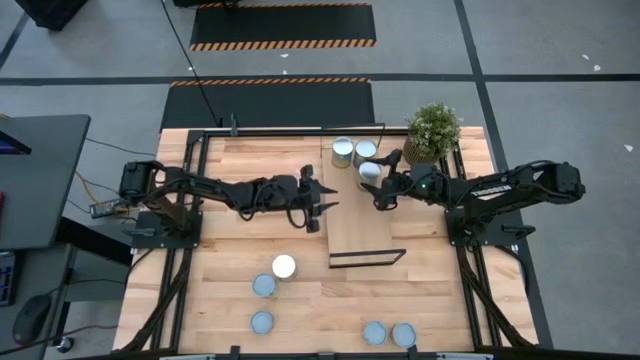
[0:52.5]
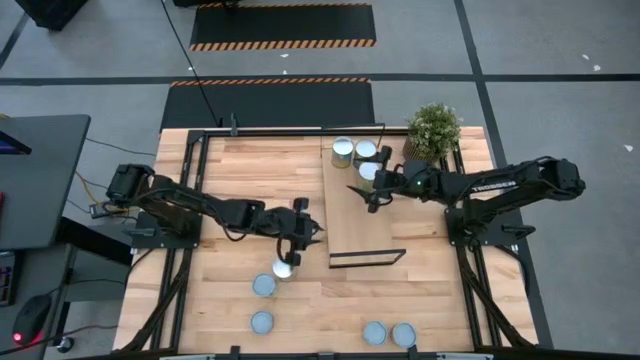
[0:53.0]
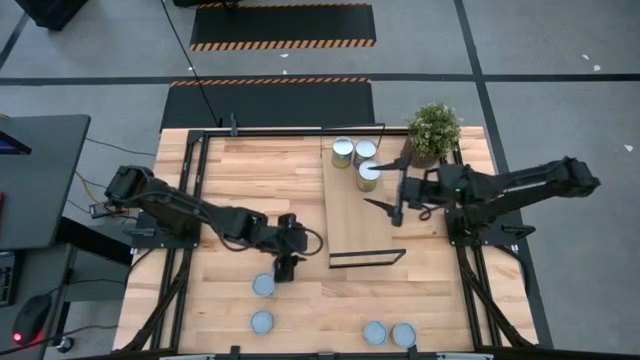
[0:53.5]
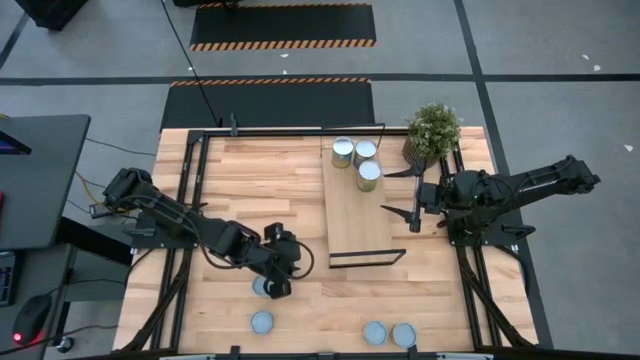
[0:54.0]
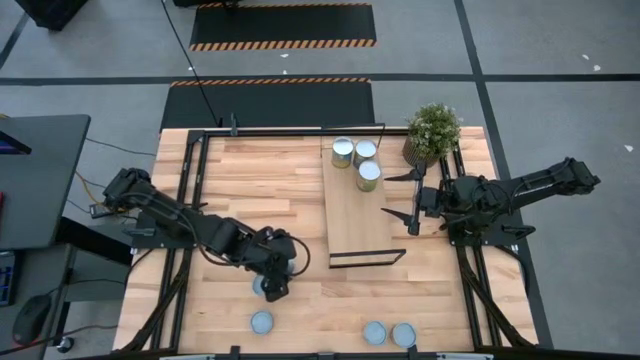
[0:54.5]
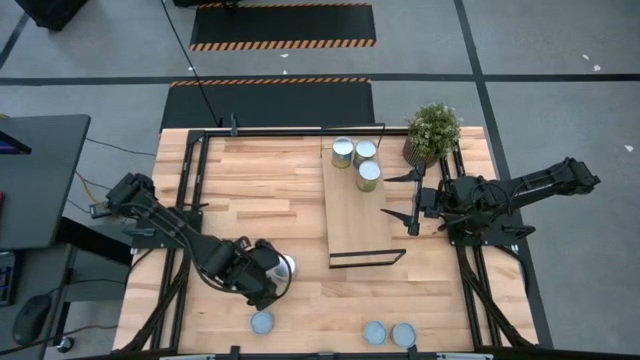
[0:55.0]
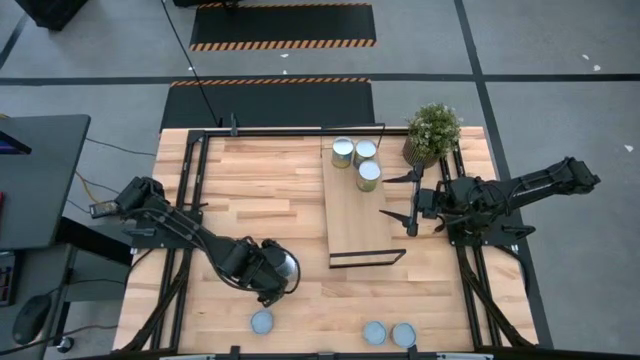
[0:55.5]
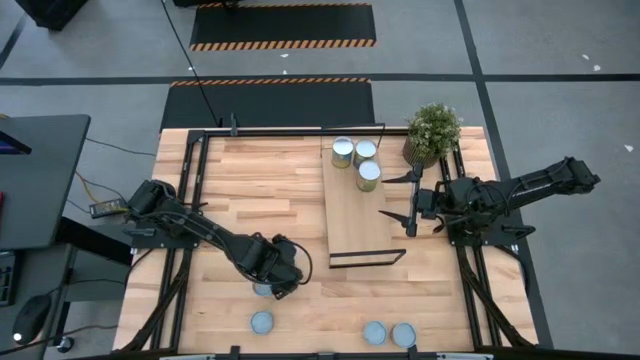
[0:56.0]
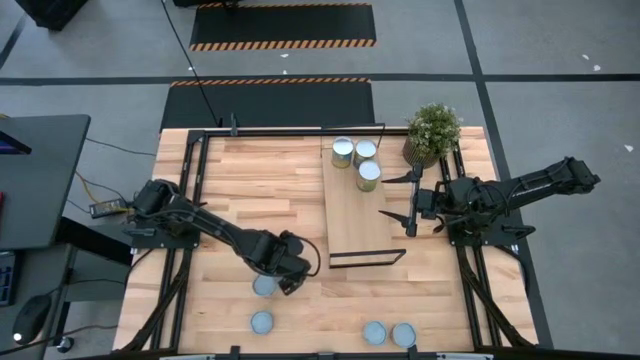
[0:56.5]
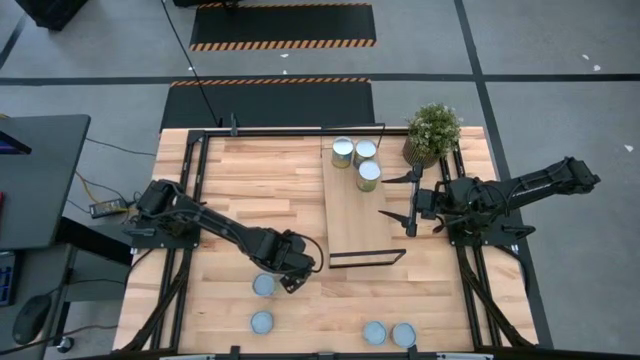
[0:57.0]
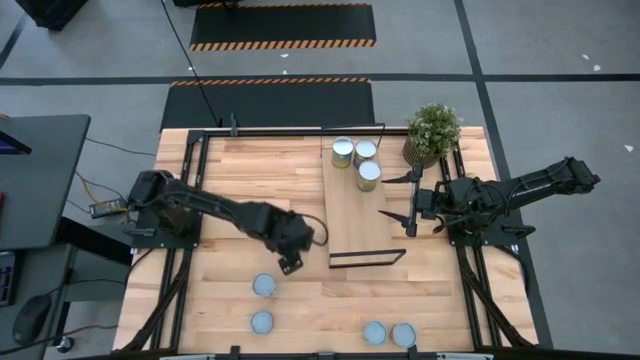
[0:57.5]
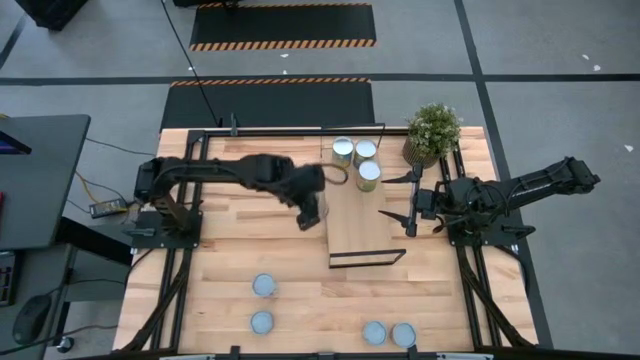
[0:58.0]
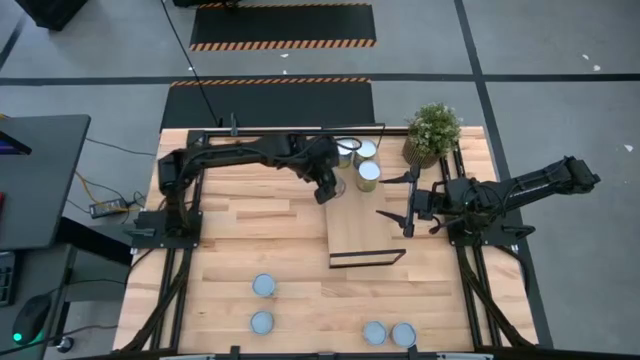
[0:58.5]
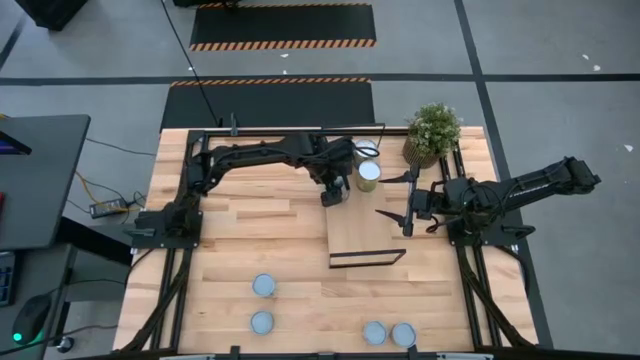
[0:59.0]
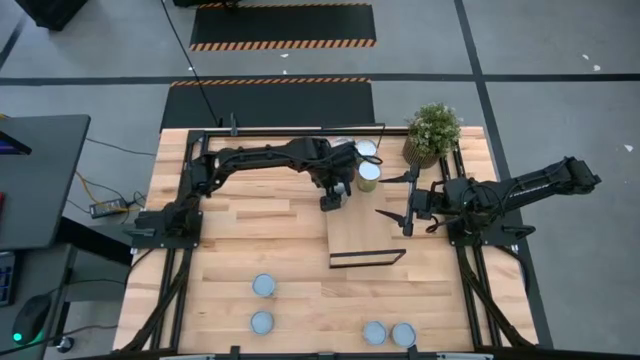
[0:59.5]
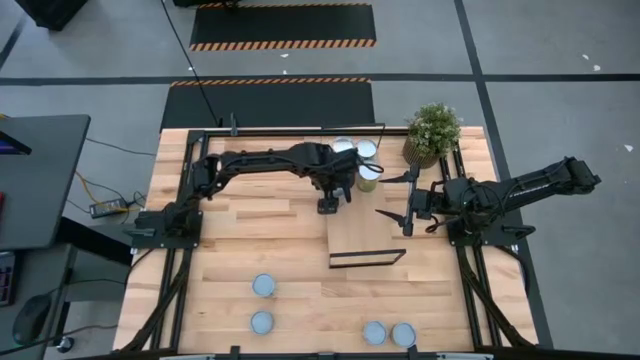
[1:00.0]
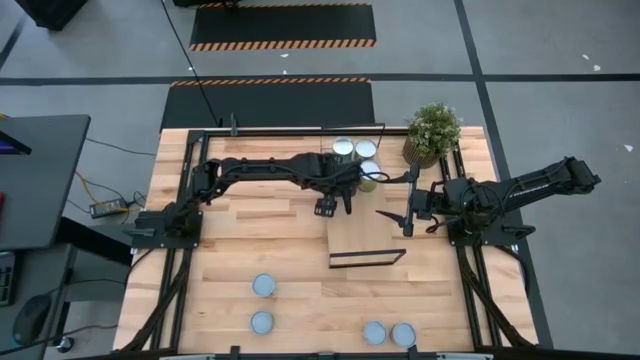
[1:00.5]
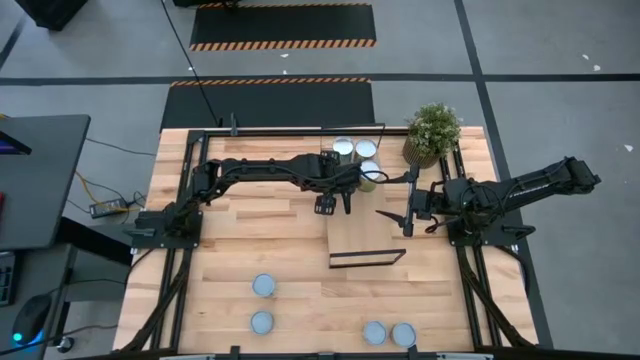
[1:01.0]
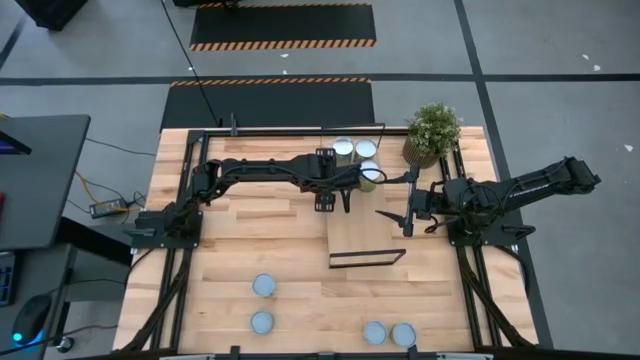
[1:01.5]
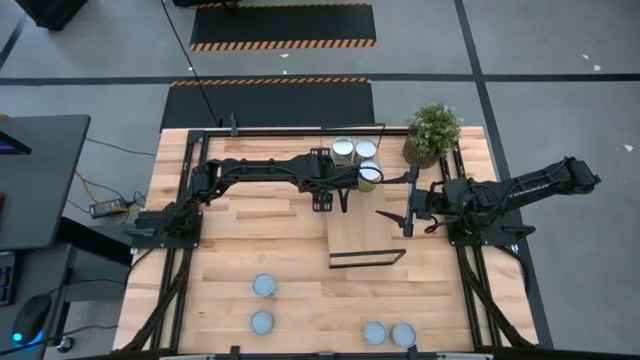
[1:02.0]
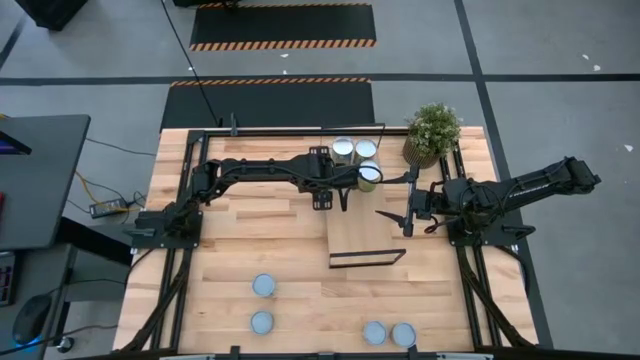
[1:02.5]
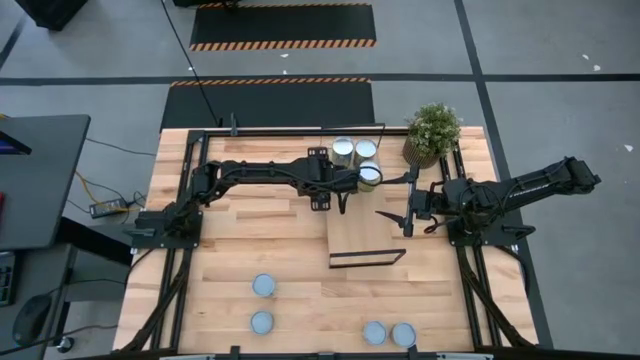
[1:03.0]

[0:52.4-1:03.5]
Task: Pick and place cans onto a shelf
Put the canned peaches on the shelf
